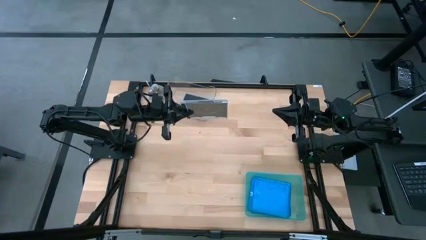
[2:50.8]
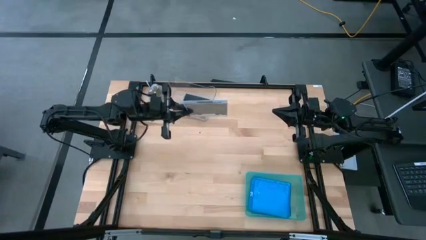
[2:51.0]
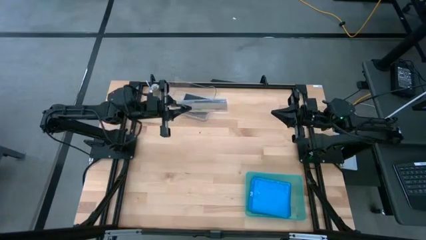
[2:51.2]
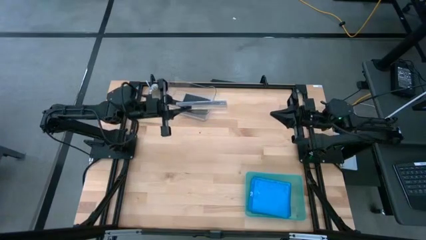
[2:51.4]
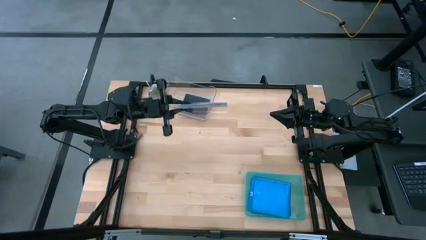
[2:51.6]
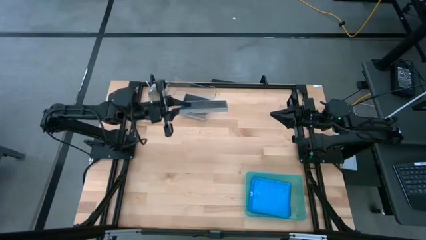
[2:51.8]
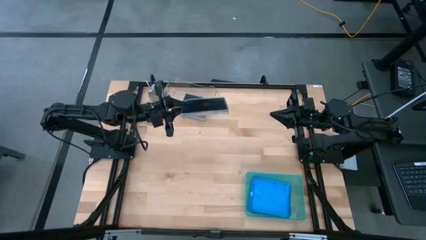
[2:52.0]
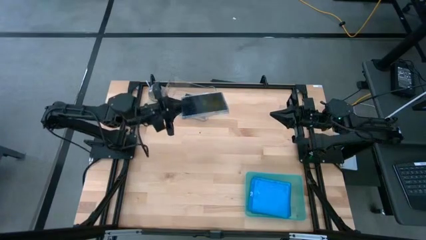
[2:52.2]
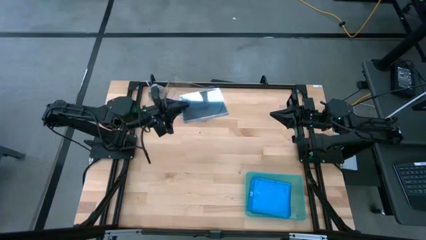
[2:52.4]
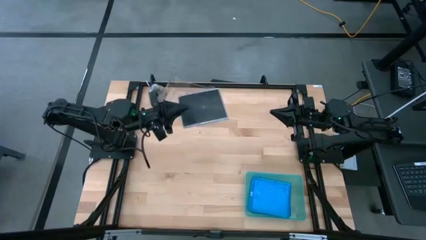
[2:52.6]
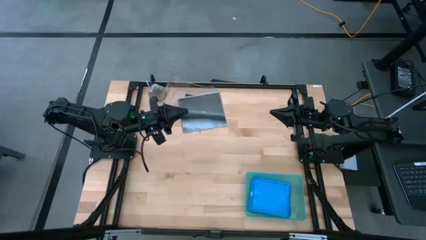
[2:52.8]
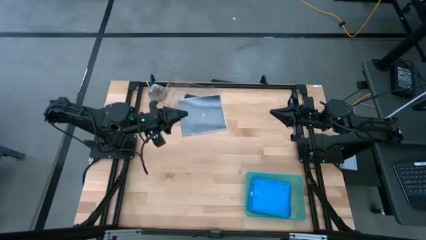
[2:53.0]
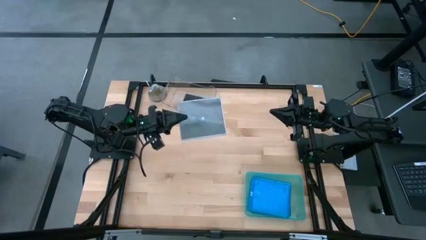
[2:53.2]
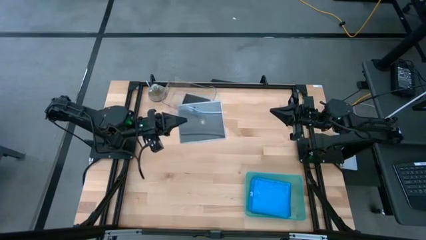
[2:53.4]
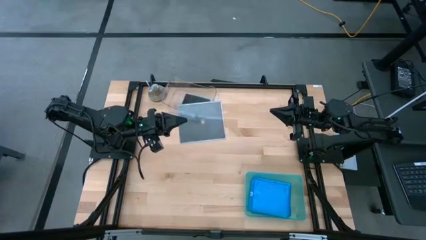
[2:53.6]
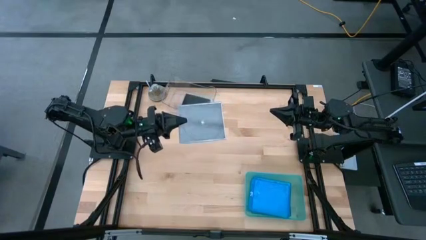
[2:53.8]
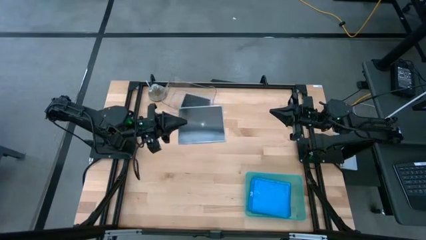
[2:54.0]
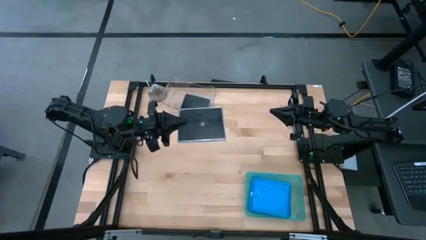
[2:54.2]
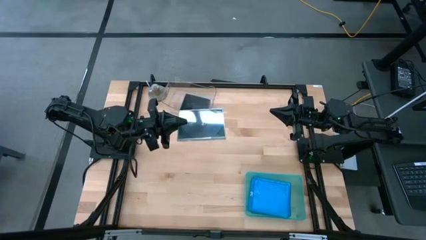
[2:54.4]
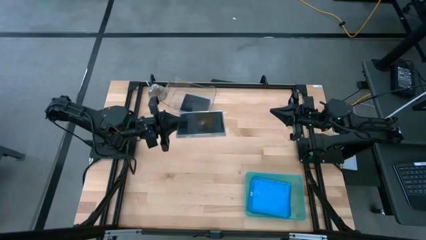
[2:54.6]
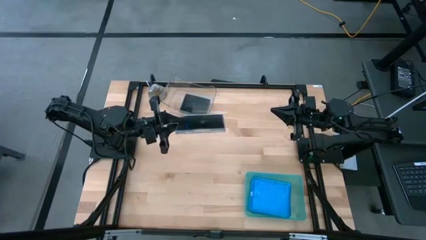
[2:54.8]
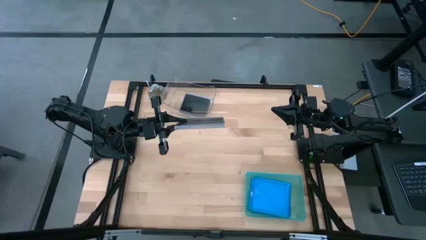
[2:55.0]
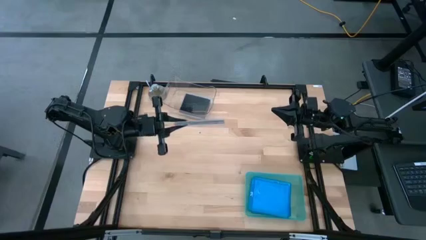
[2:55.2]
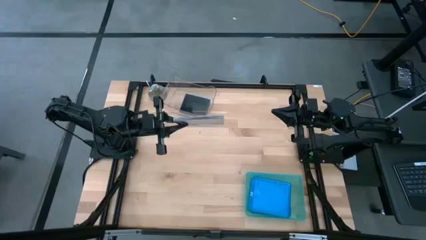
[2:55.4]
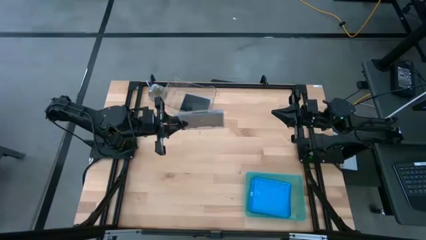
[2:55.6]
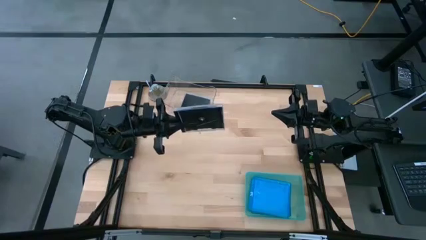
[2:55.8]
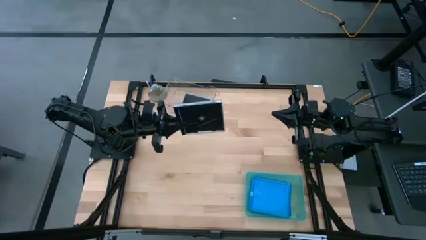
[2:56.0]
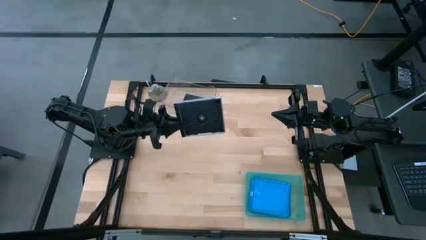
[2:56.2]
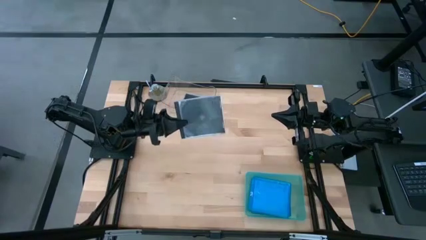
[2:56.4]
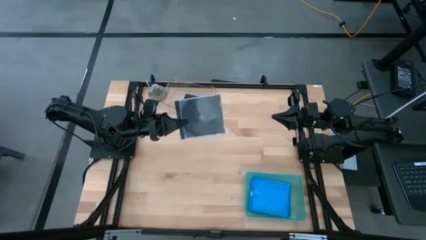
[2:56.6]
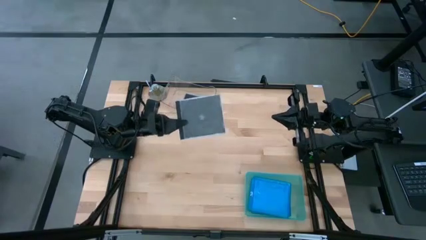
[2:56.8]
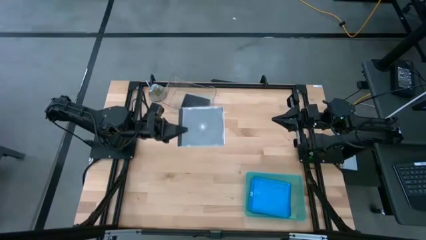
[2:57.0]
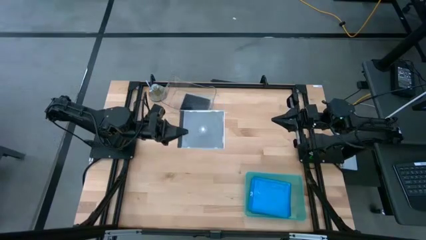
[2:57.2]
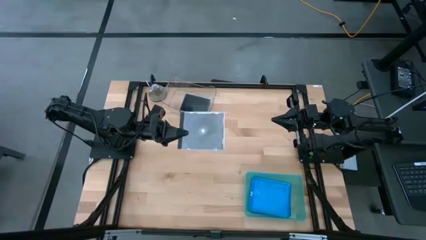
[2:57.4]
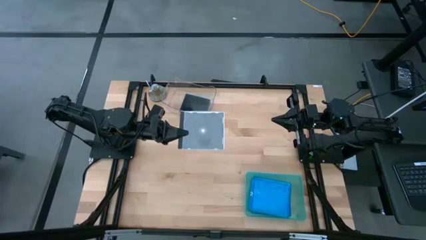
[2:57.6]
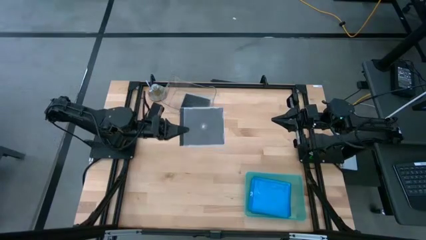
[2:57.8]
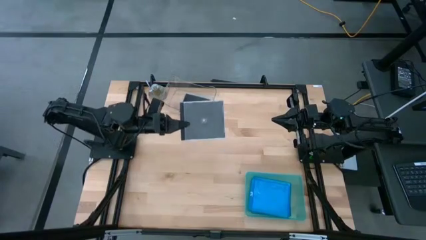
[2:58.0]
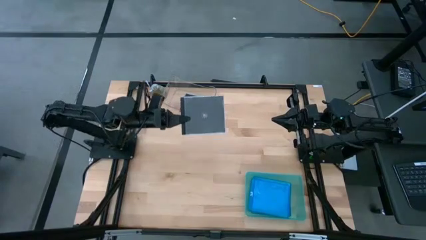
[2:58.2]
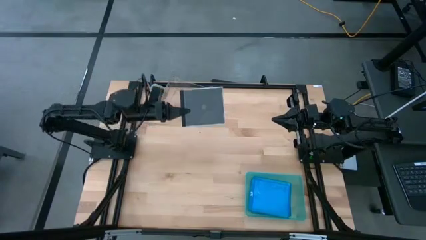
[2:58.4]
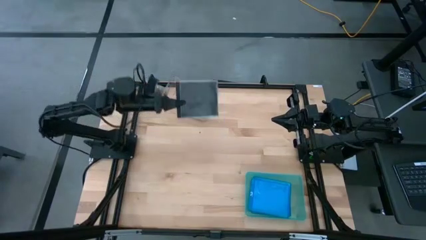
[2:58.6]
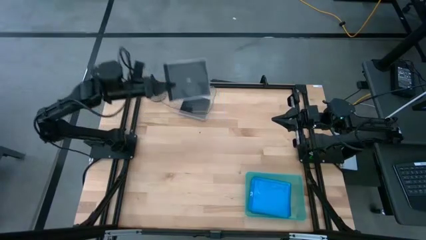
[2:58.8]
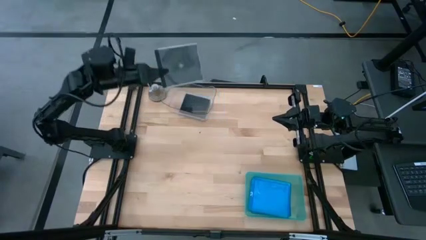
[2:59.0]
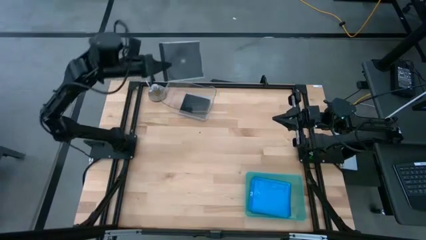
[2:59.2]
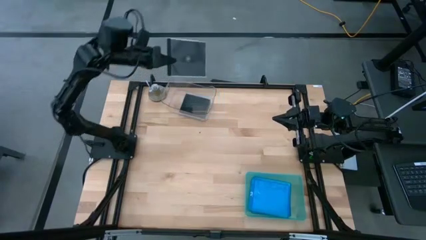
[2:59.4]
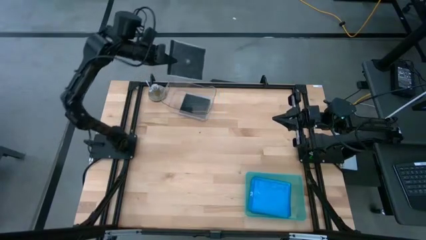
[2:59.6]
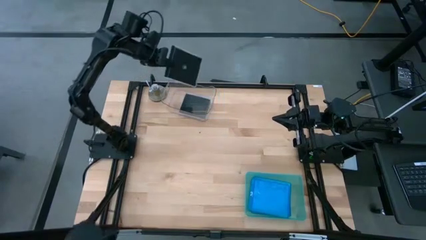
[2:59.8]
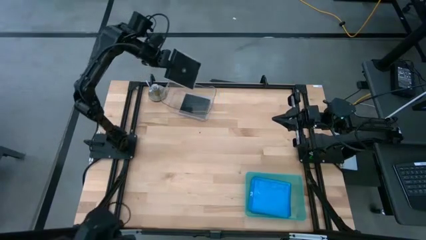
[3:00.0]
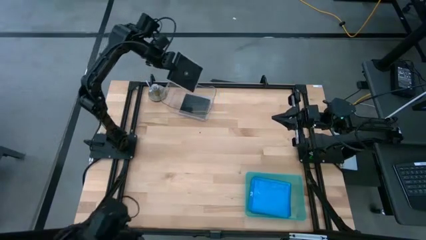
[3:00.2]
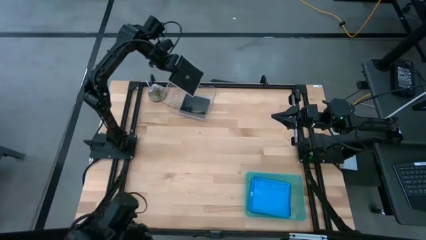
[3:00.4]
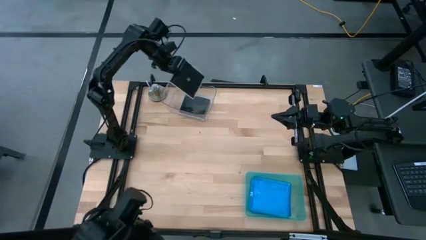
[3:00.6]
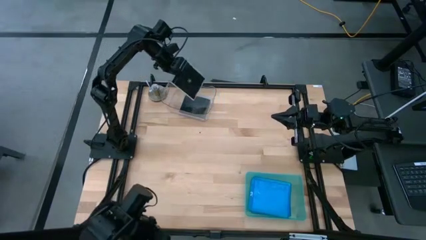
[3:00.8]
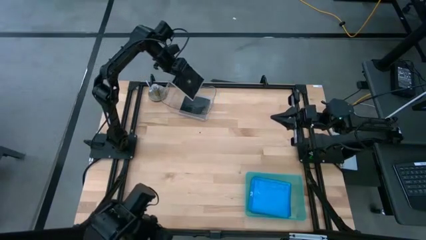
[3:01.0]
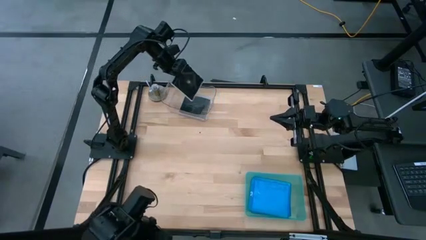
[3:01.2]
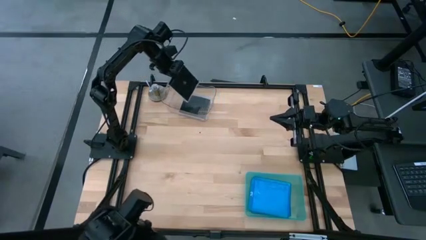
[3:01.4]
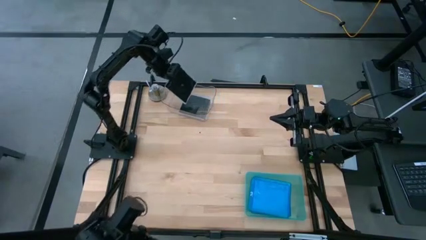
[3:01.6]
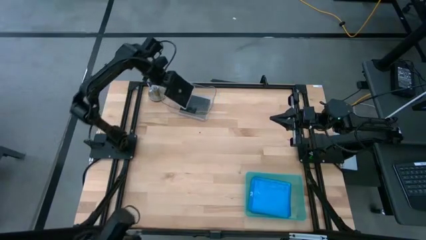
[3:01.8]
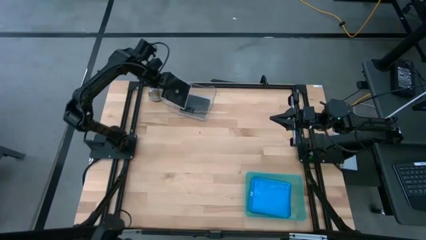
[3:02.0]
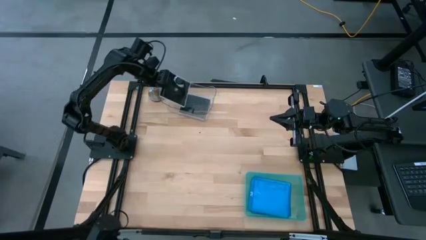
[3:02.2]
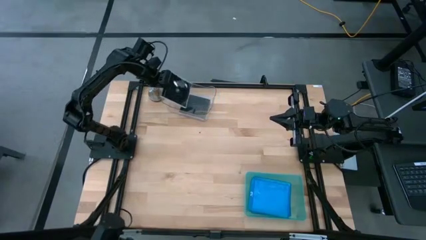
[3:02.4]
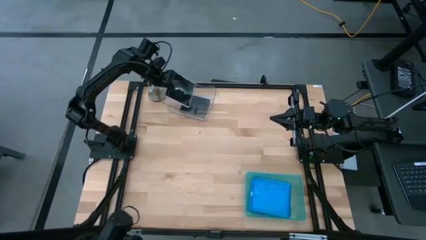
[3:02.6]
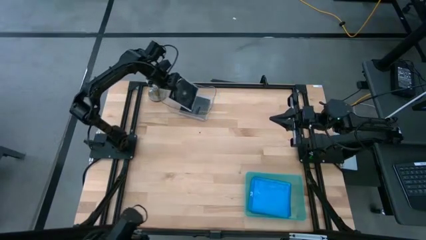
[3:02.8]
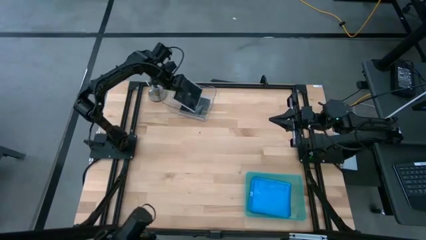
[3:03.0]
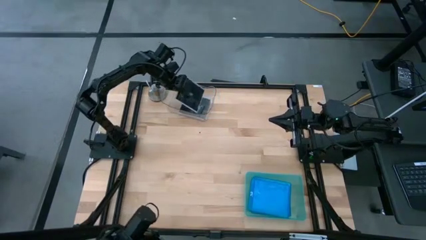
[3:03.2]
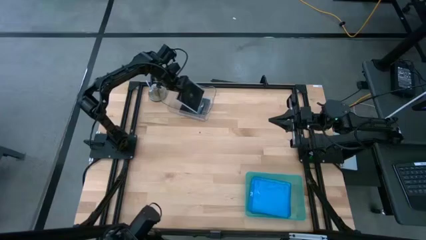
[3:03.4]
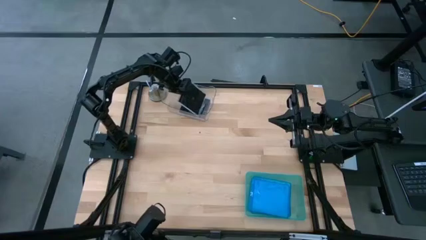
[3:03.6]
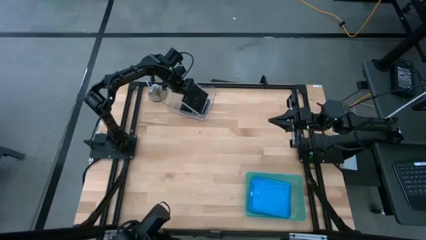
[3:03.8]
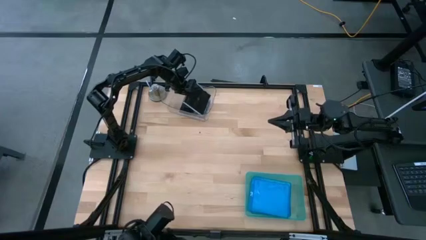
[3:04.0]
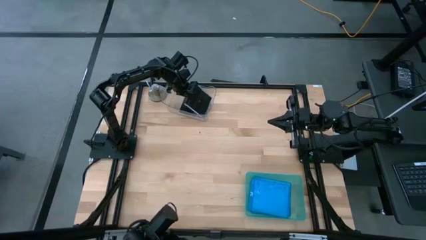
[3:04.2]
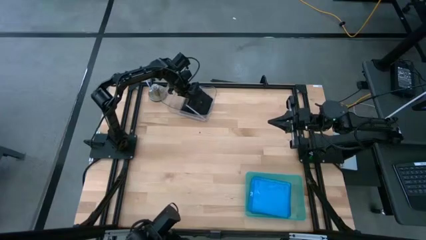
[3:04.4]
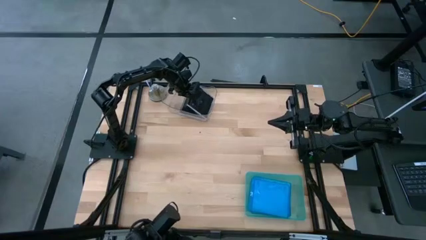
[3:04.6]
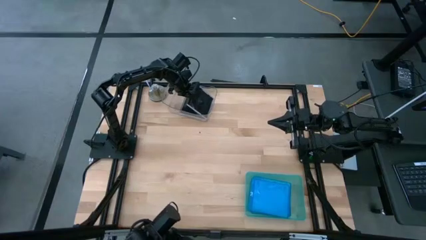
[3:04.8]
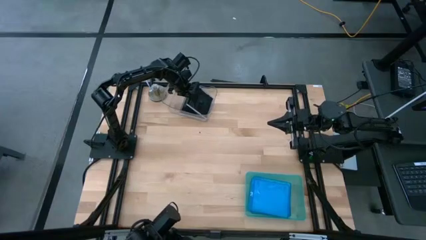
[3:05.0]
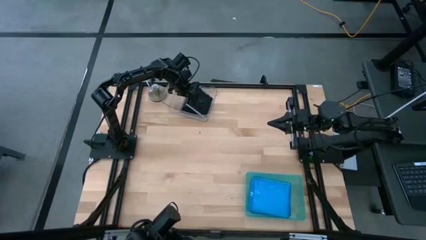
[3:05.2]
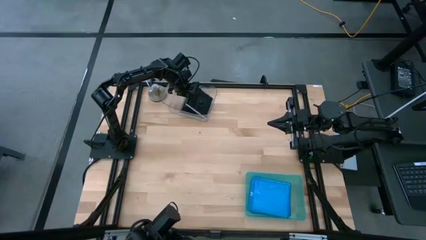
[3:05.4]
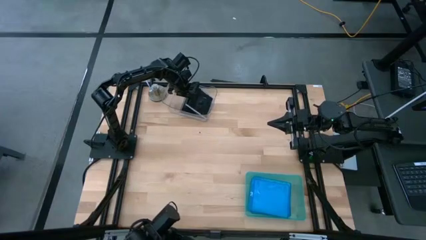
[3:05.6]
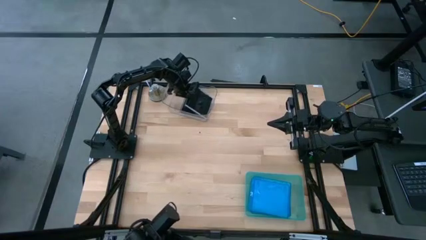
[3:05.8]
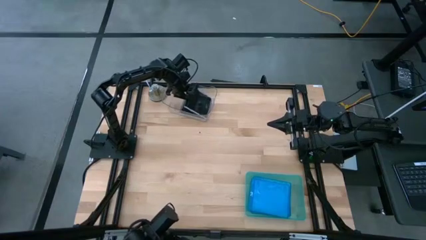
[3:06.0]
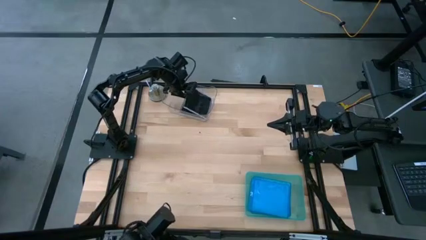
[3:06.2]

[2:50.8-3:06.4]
Task: Pick & place jewel cases by type
Put the black cd case into the transparent bin

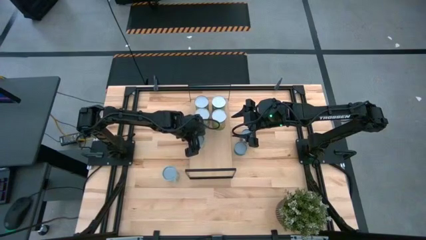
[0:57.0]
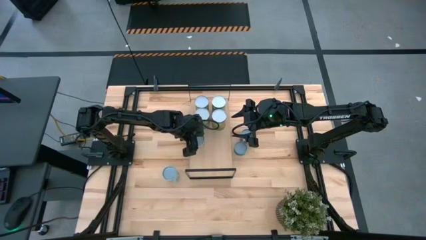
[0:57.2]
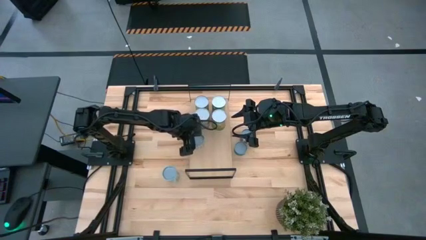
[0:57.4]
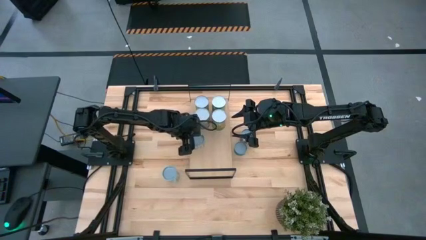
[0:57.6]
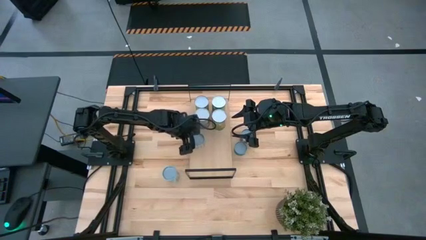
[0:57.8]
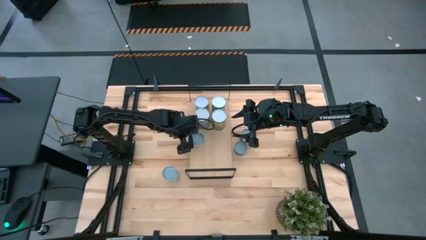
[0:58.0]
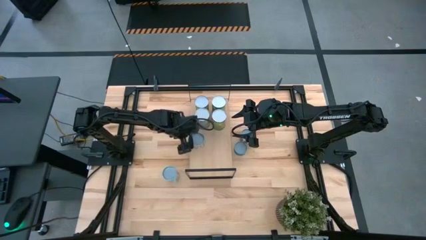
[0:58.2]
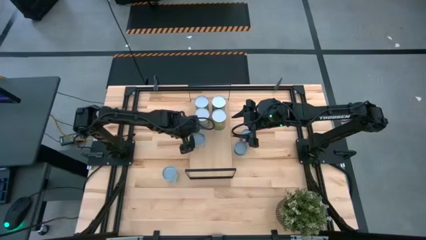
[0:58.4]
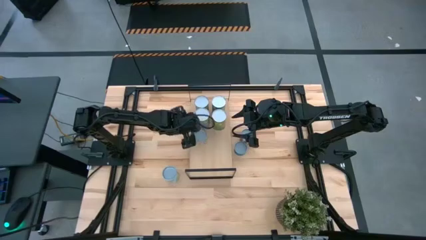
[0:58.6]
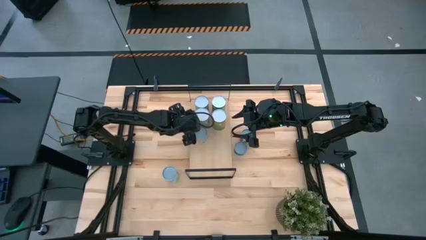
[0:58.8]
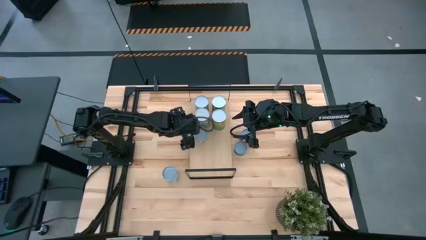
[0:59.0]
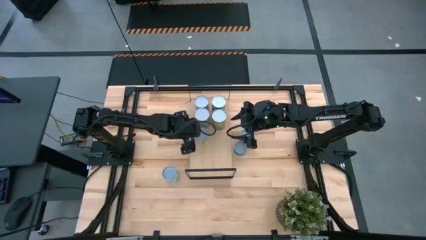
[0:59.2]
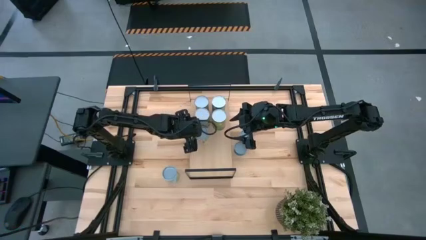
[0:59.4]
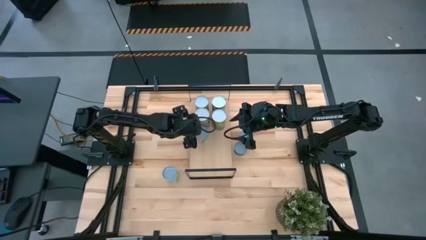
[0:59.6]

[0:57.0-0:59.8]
Task: Pick and place cans onto a shelf
Adjust the canned tomato on the shelf
